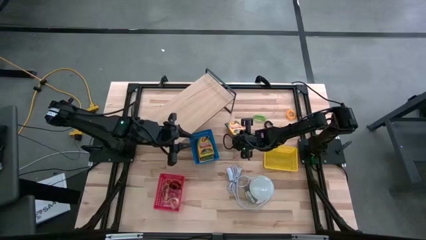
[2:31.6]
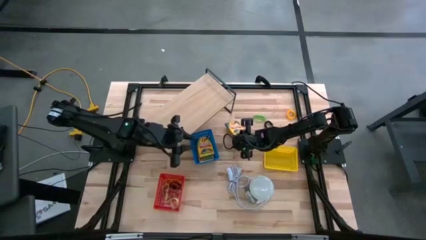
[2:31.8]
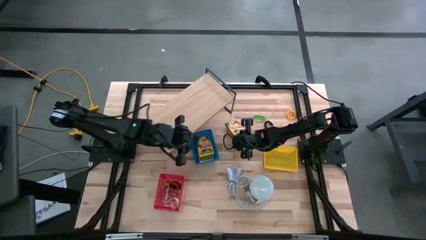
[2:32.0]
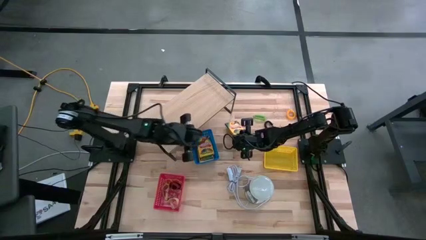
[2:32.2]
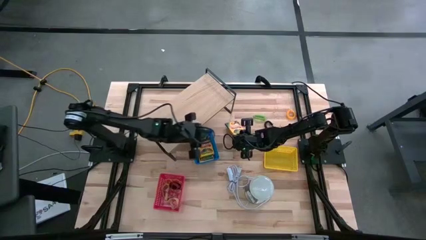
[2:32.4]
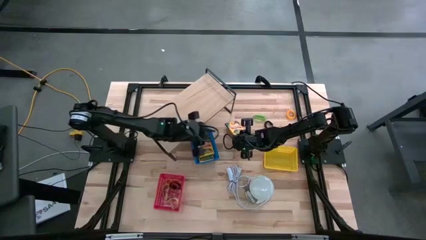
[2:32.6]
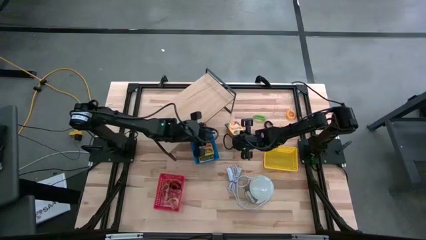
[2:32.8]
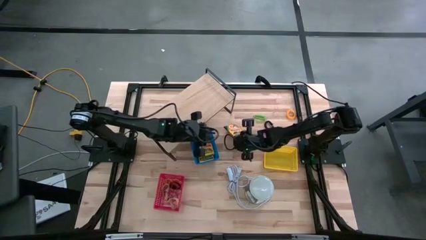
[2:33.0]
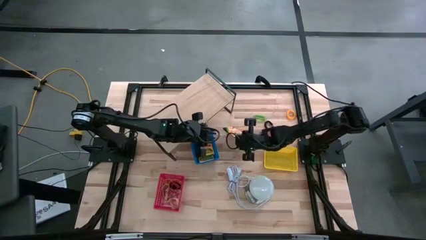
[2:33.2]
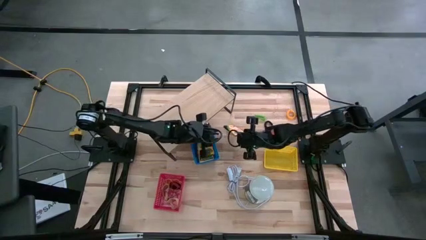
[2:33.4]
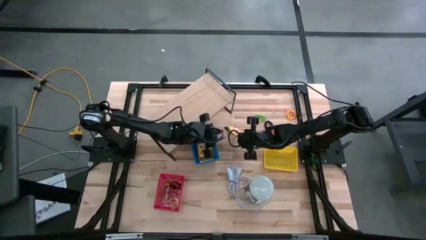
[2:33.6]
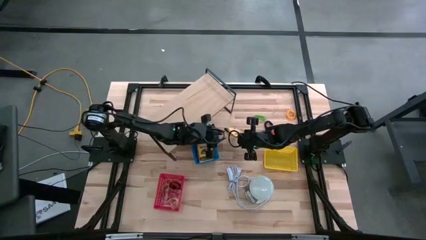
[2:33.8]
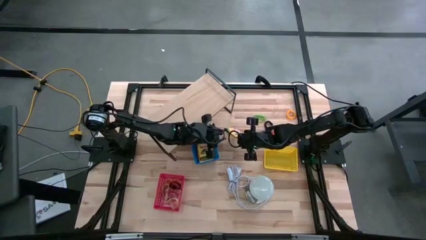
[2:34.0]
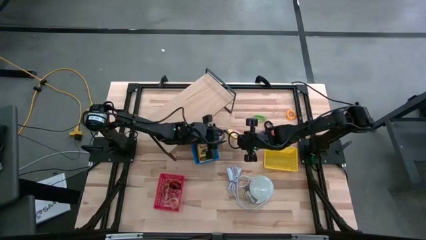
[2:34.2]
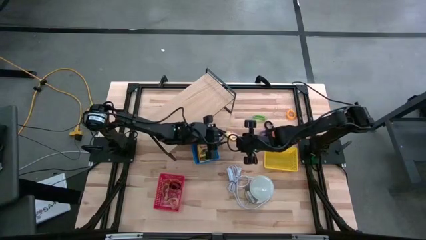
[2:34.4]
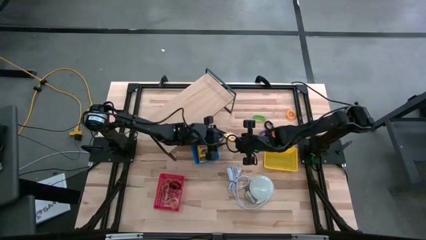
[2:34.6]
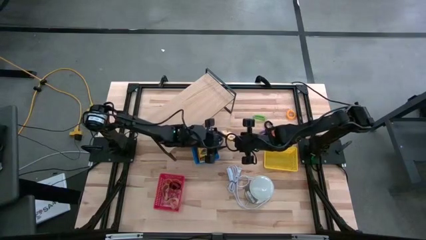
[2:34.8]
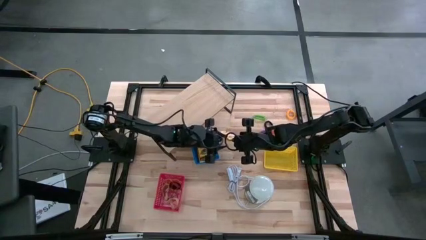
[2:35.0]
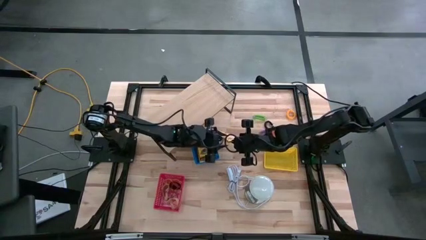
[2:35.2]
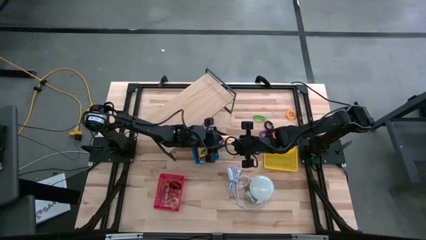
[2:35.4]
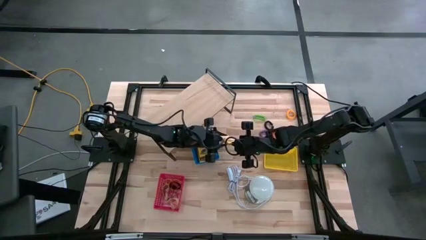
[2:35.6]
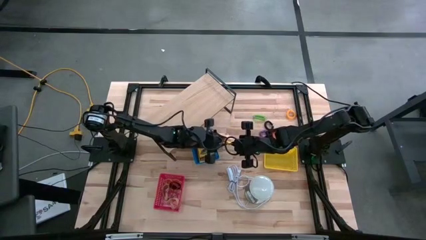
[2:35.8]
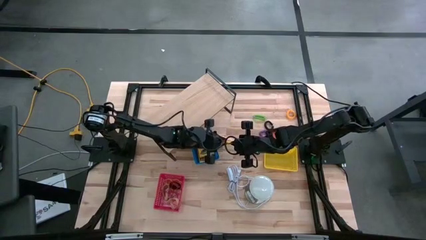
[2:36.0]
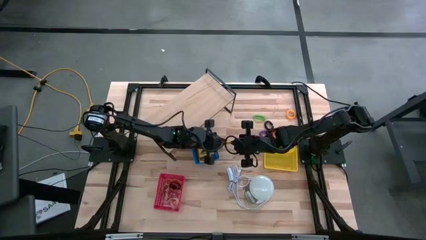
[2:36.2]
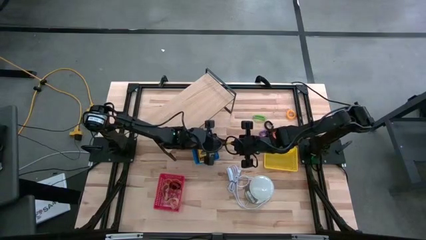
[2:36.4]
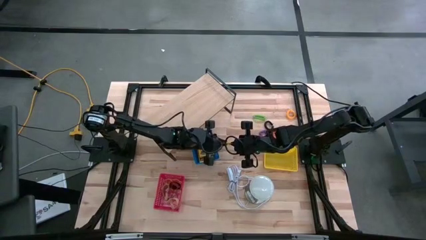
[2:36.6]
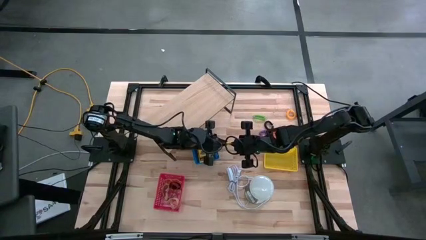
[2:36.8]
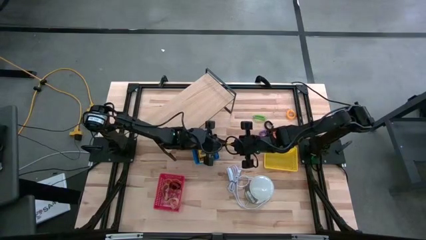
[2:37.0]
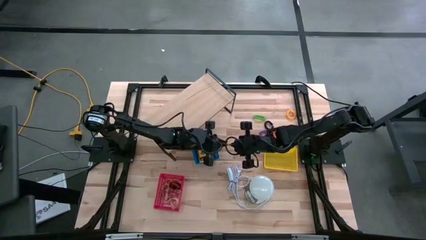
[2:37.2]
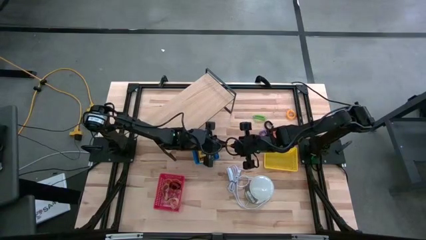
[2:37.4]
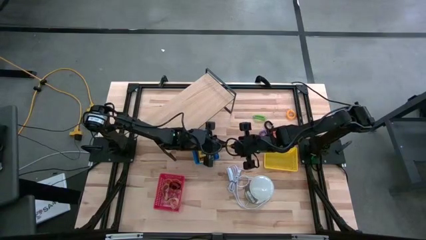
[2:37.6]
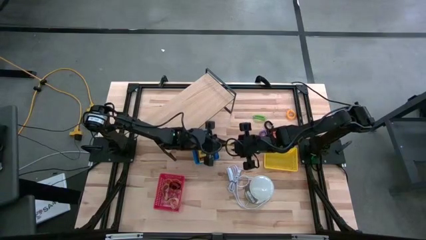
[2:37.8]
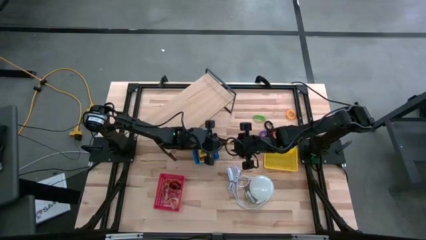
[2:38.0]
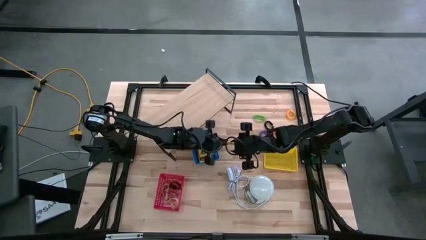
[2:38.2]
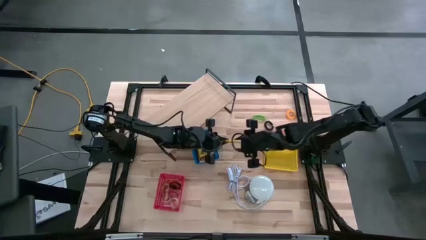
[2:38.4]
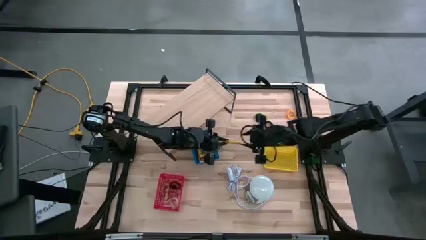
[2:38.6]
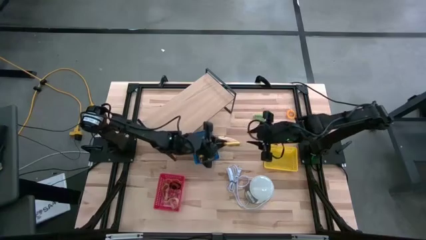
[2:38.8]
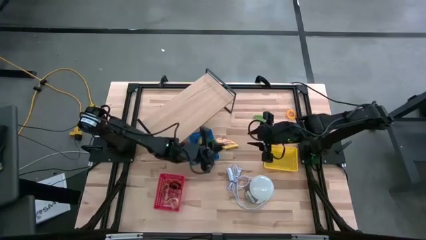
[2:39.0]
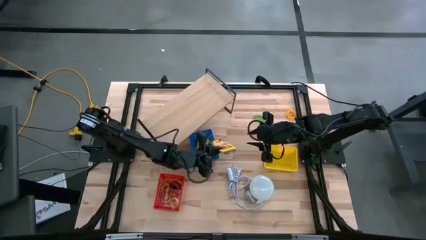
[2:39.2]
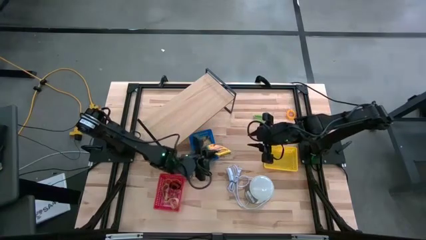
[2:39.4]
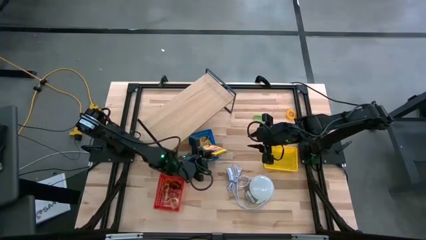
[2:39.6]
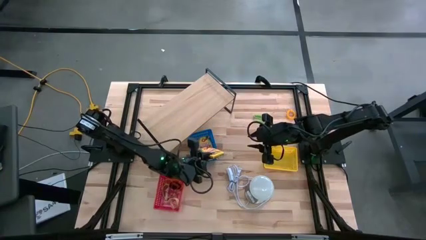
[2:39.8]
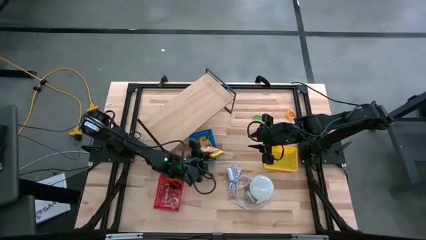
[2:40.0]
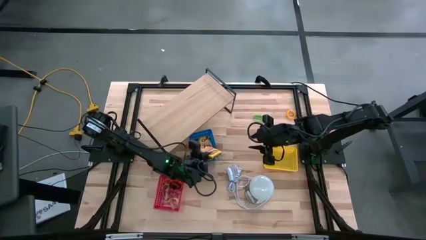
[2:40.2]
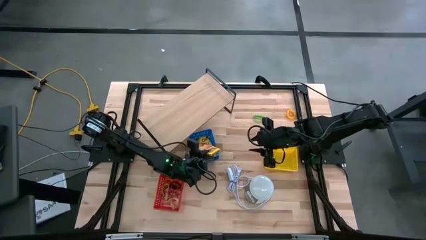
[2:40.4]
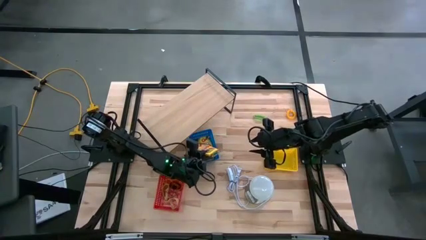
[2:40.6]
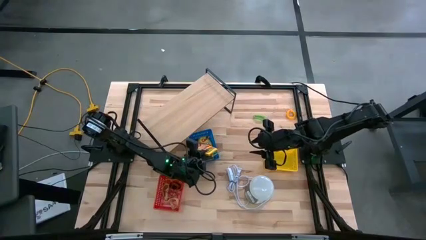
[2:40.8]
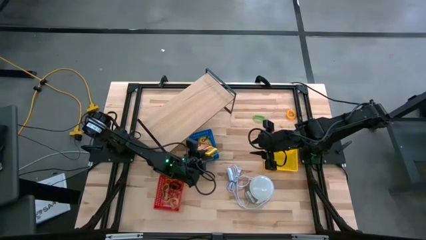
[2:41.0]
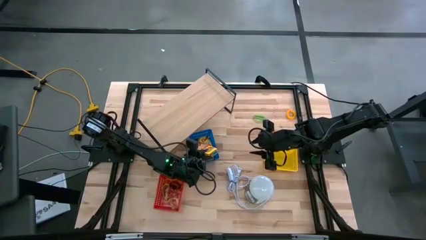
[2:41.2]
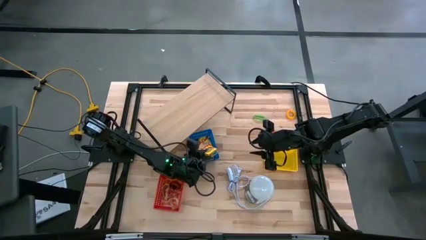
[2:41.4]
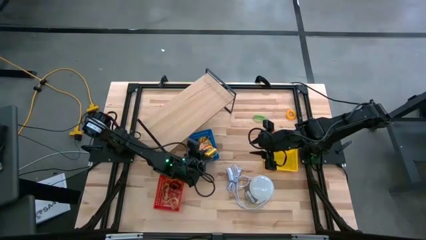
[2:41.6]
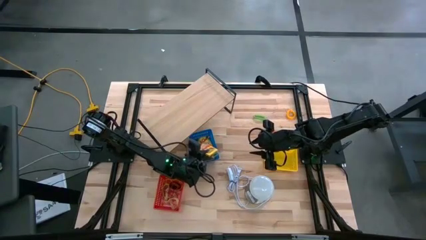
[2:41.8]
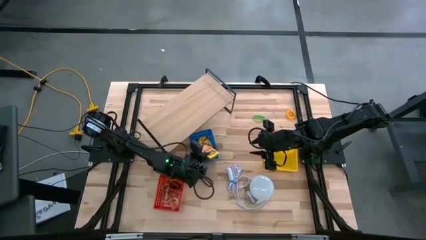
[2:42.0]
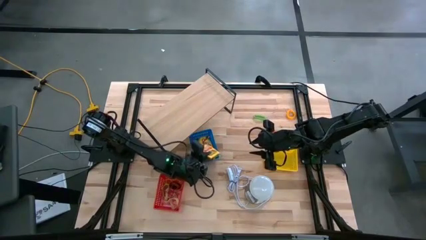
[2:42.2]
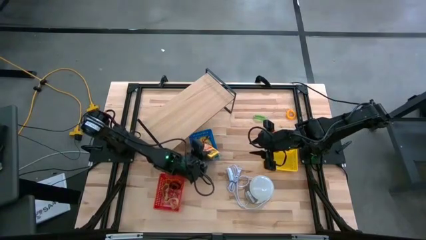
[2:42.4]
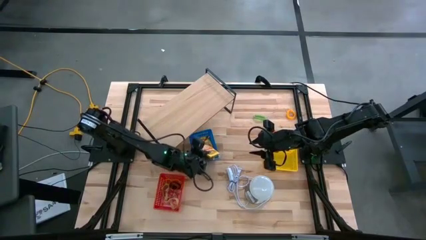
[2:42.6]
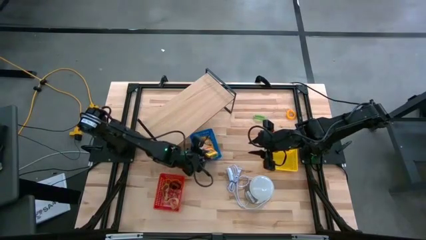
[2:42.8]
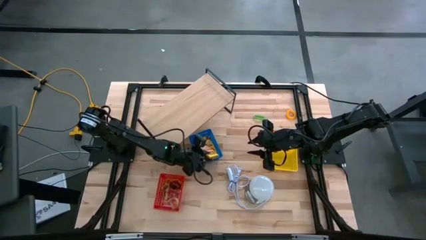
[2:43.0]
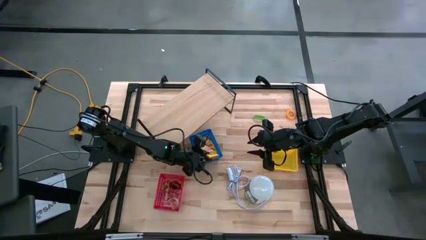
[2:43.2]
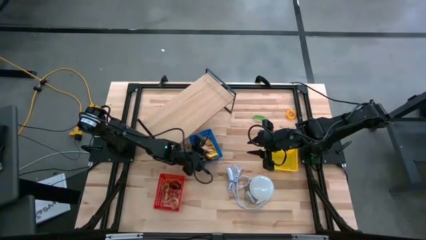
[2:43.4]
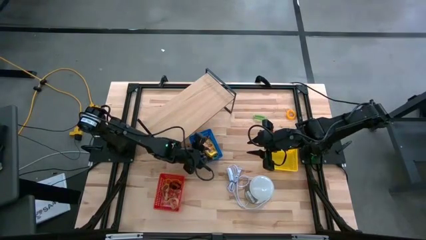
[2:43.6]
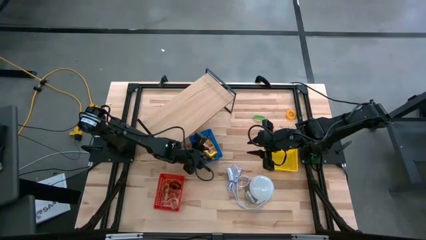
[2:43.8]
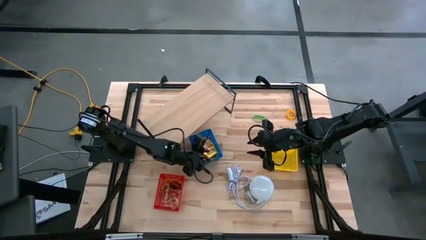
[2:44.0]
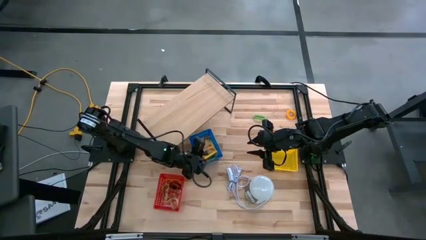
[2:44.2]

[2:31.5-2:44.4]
Task: Pick & Place Office Desk Supplies
Put the yellow pack of crayon into the blue bin

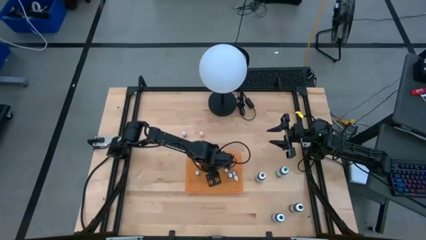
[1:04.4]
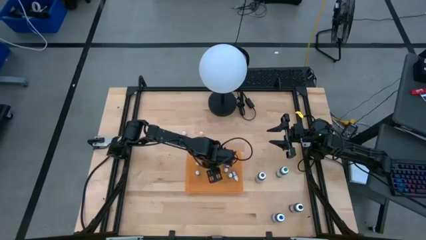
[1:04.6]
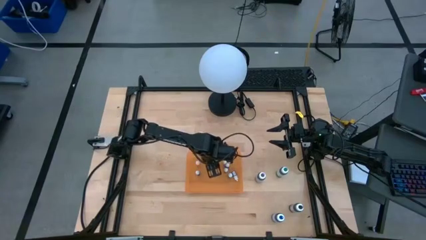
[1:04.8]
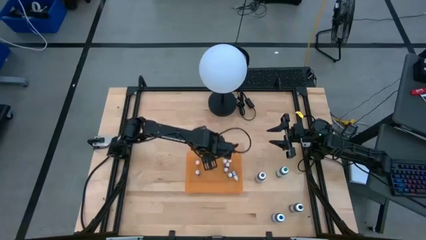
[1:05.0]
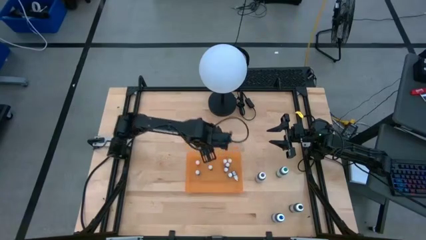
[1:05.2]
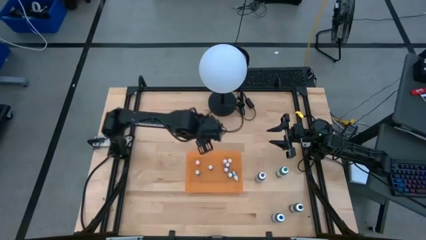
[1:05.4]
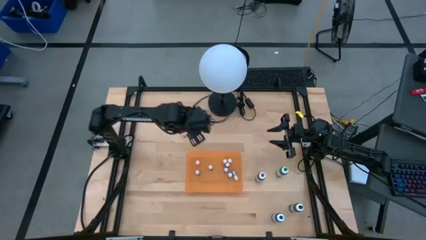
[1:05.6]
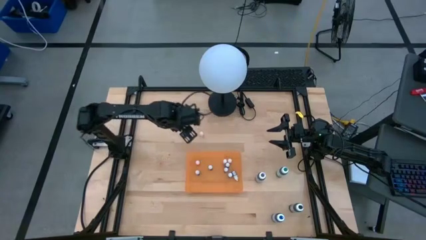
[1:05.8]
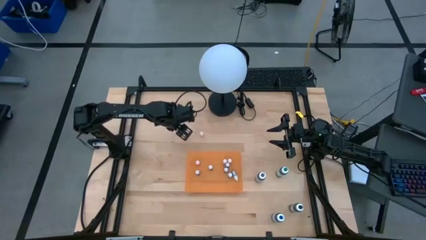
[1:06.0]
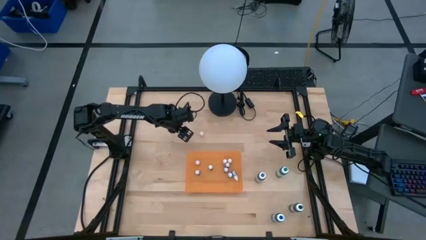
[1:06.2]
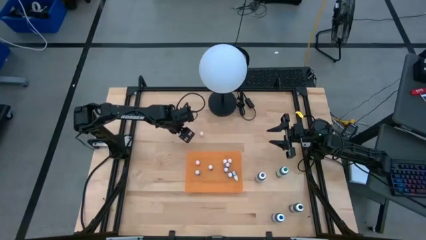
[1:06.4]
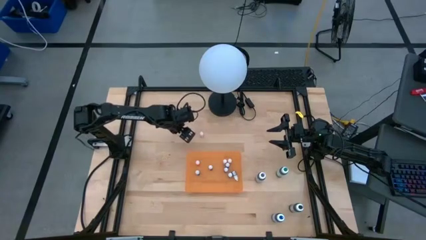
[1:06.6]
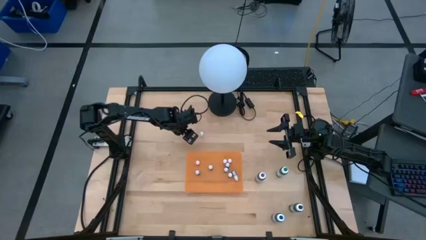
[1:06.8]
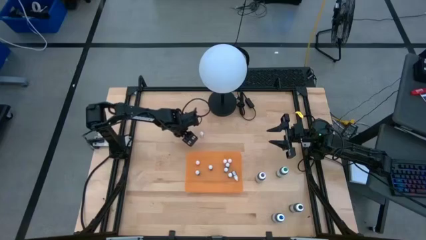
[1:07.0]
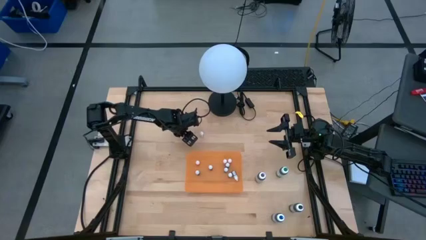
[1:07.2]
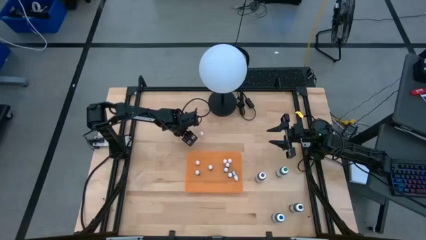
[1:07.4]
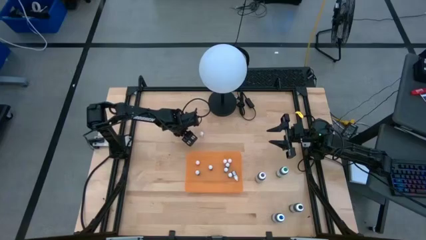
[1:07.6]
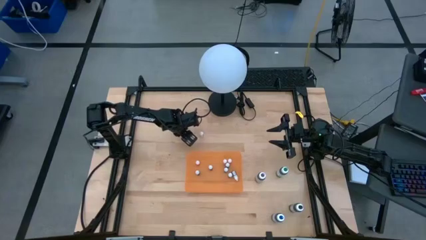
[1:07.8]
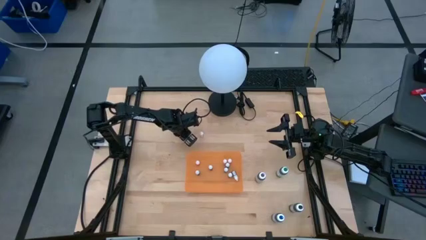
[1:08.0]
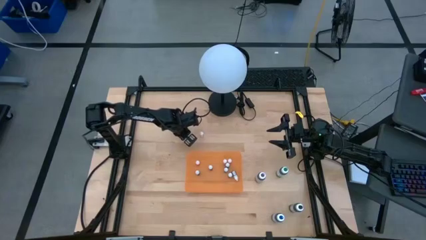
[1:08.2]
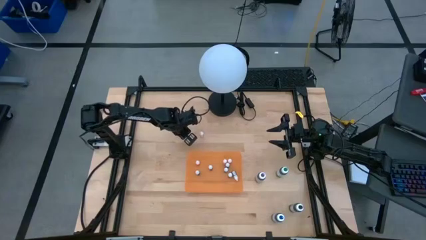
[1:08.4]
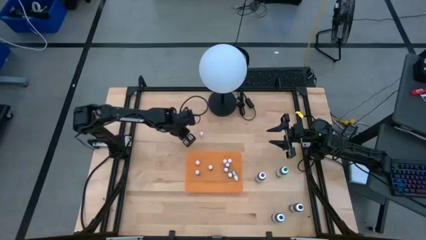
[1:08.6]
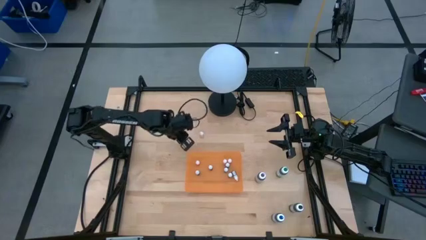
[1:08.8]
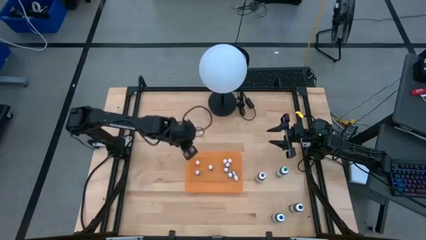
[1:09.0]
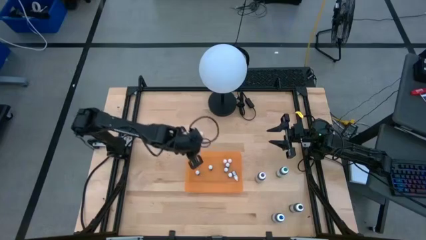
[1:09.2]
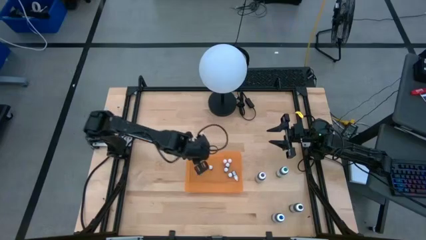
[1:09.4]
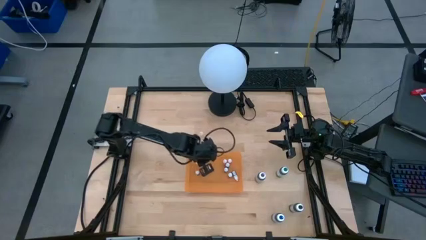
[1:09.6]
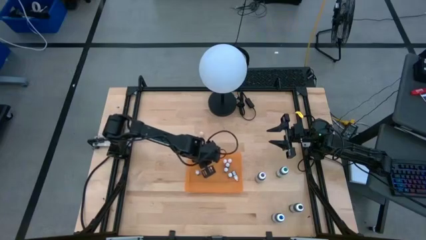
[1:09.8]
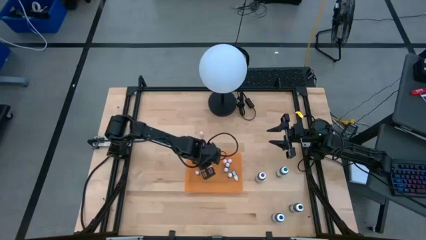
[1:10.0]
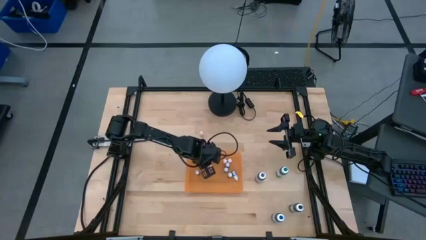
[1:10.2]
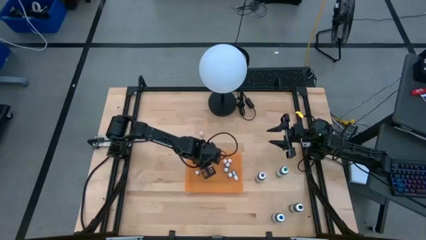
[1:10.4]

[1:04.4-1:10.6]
Task: Pick & Place food coloring
Put the small purple food coloring bottle into the orange container
